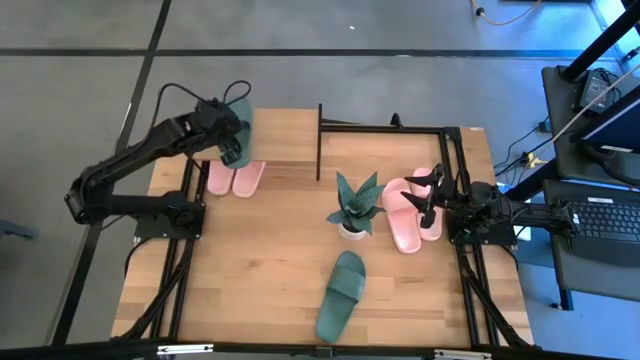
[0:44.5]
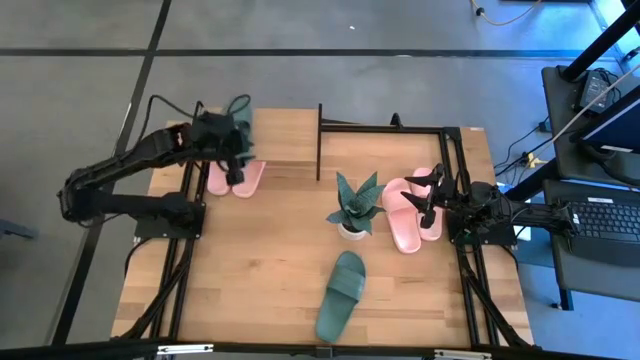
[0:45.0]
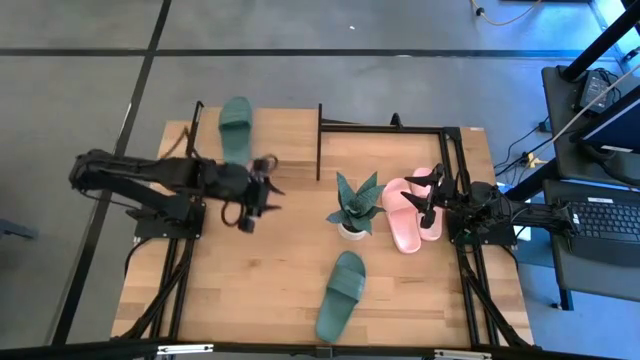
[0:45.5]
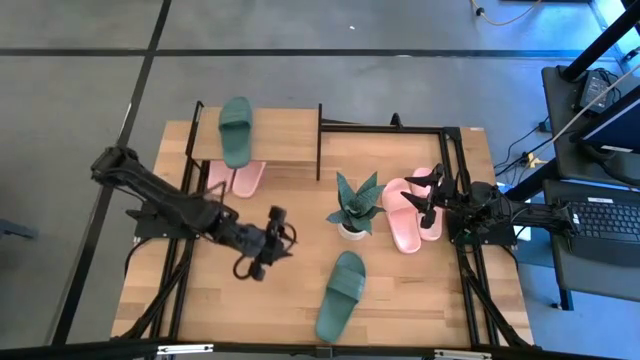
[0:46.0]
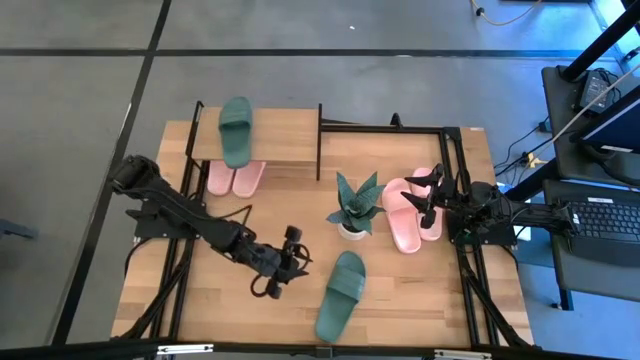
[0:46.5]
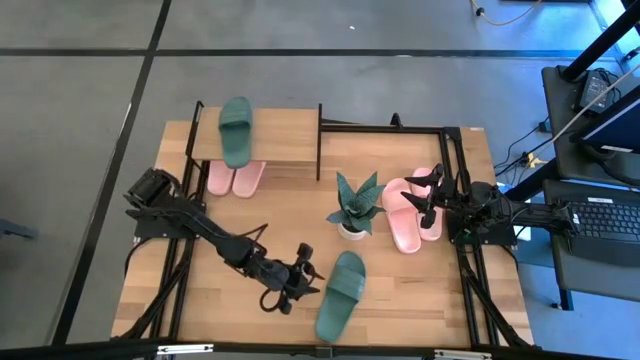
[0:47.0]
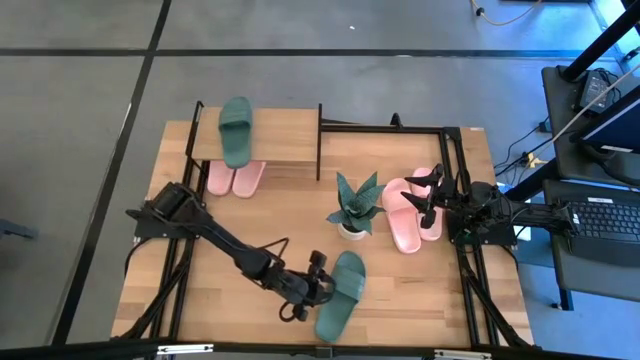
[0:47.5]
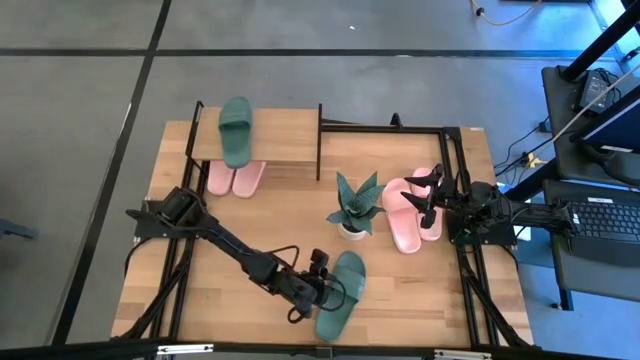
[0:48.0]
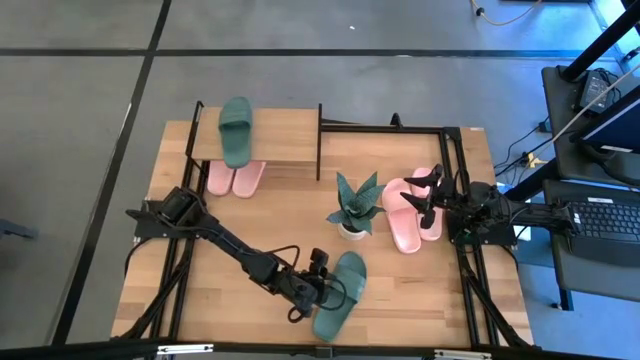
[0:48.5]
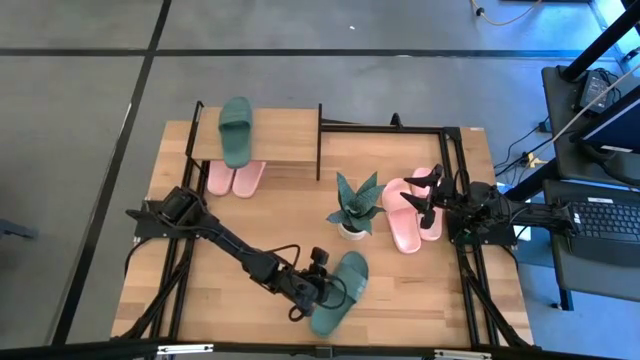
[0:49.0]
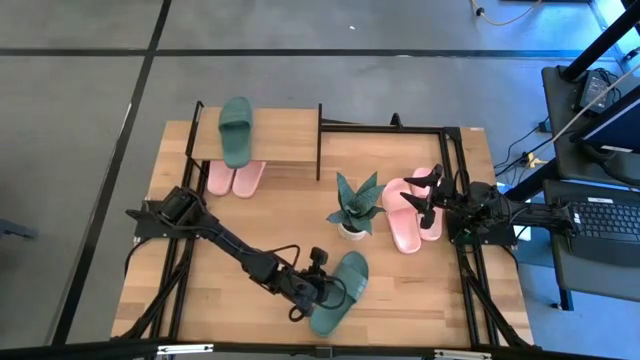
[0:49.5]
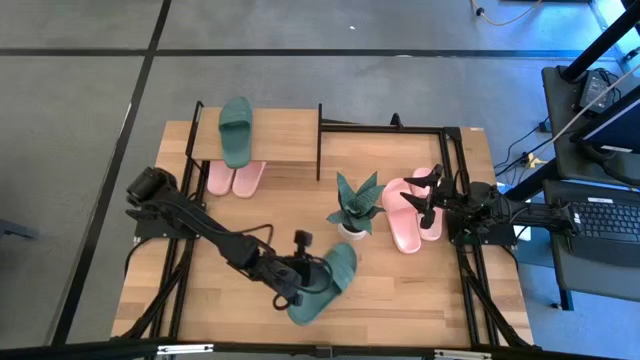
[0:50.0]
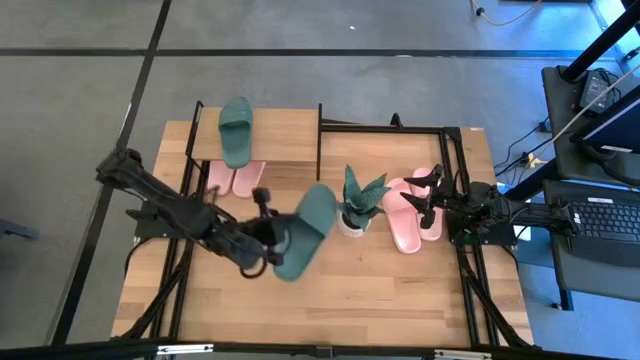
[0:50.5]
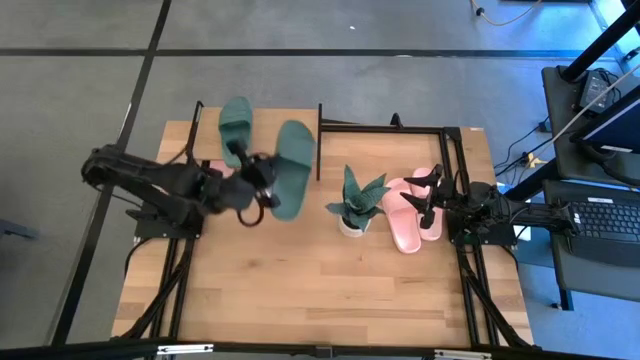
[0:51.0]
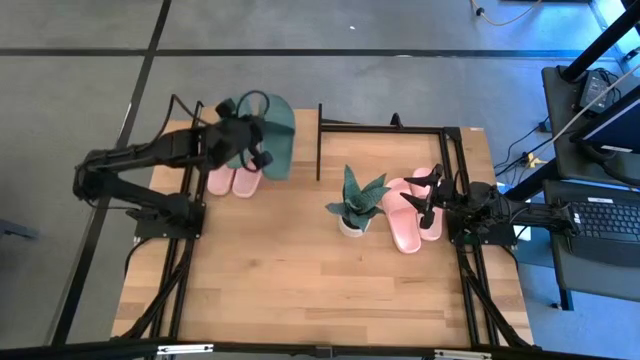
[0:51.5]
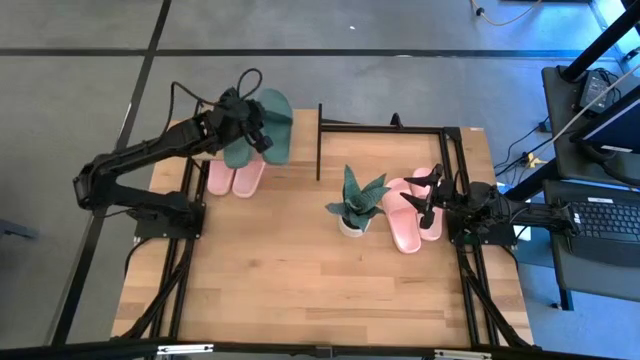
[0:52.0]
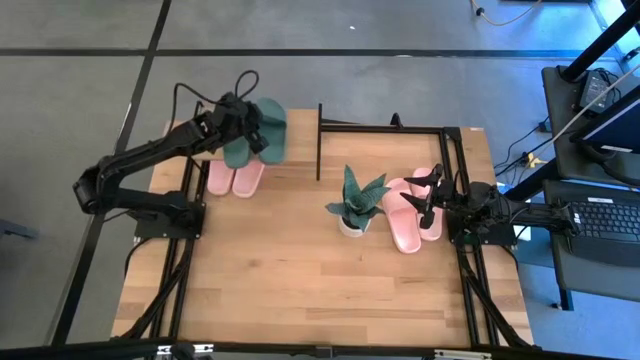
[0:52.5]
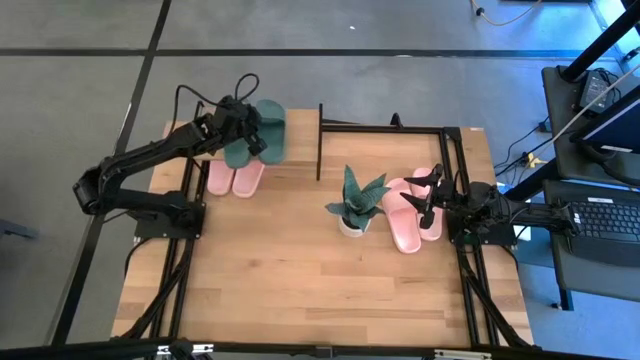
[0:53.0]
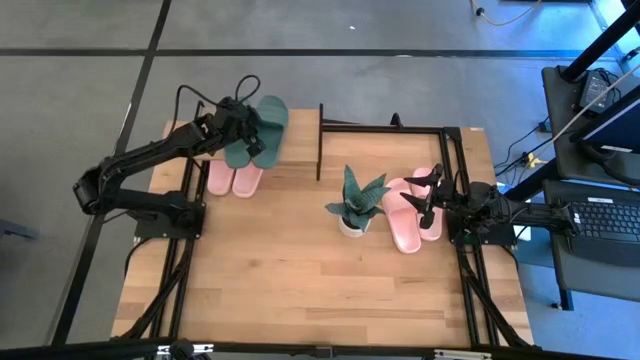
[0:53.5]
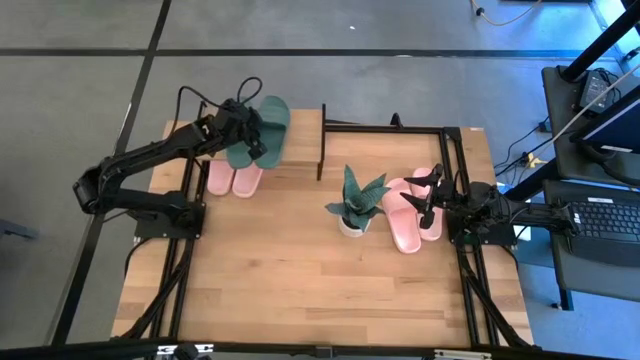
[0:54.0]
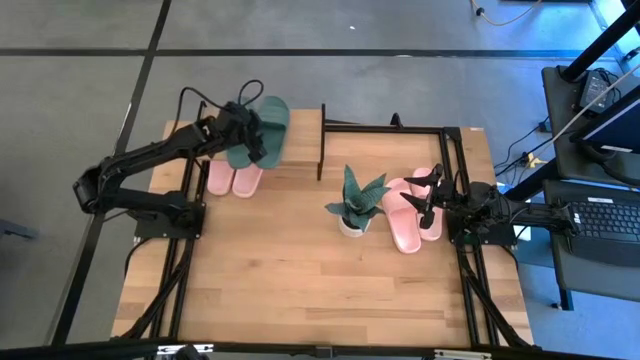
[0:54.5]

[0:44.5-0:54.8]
Task: Pick and place slides into the shelf
Put the green slipper on the shelf

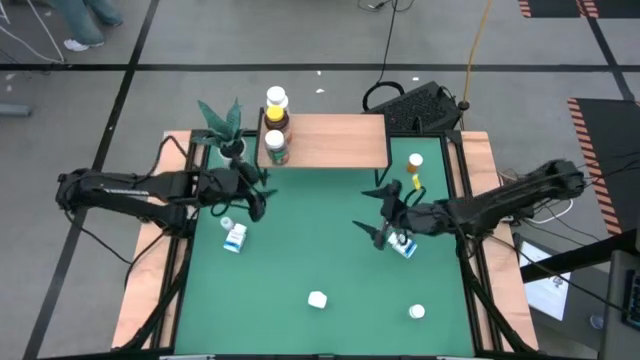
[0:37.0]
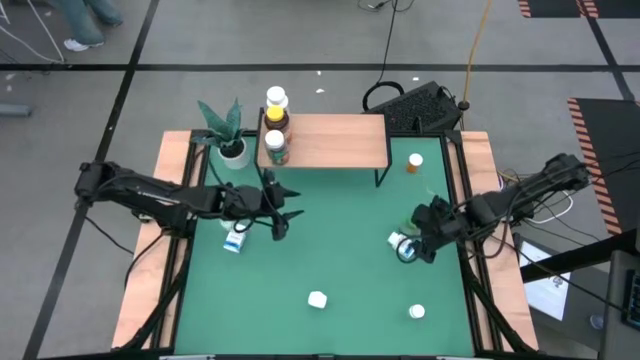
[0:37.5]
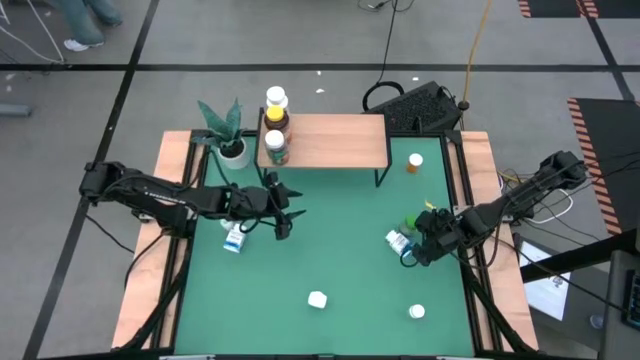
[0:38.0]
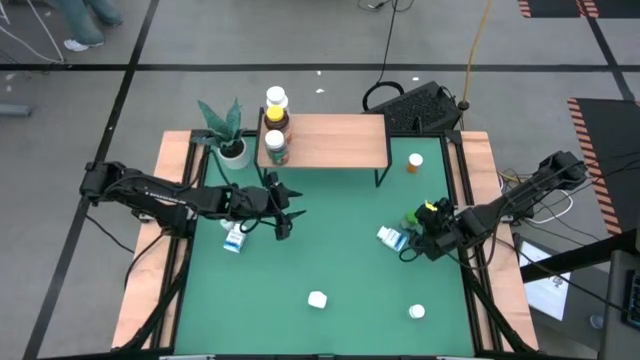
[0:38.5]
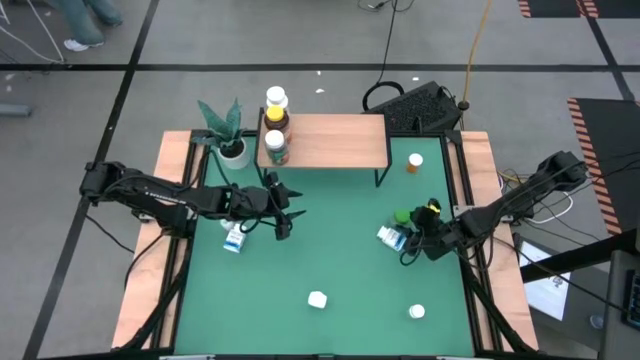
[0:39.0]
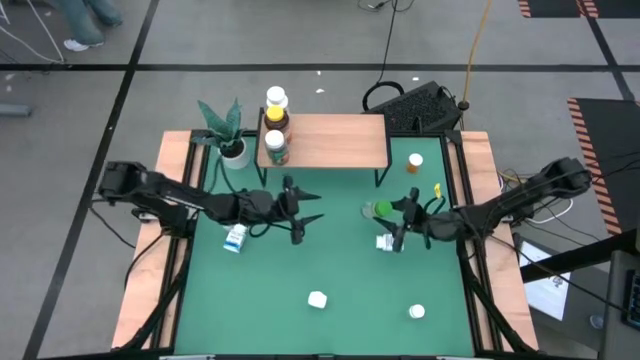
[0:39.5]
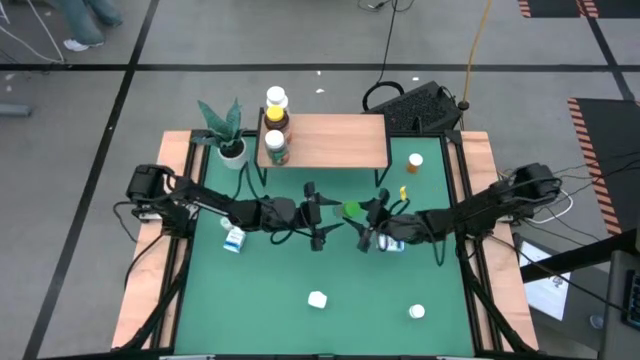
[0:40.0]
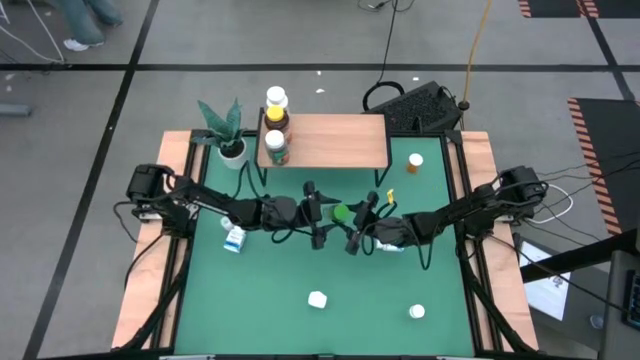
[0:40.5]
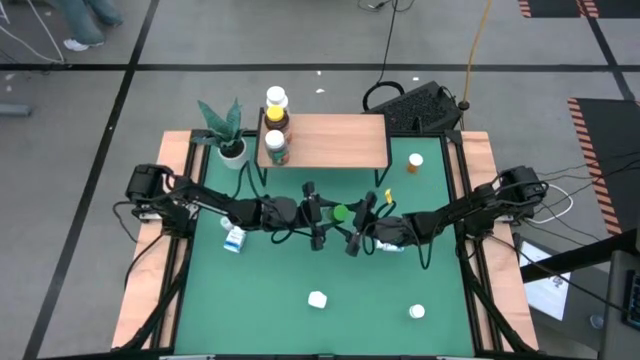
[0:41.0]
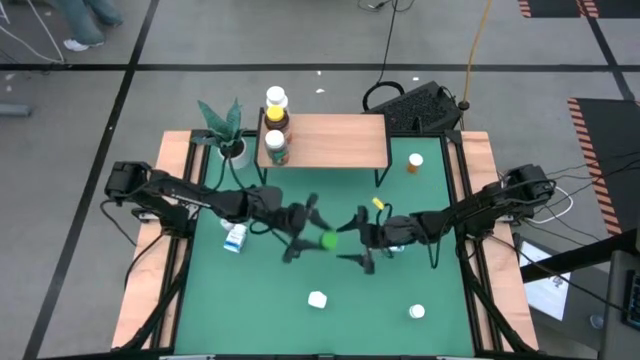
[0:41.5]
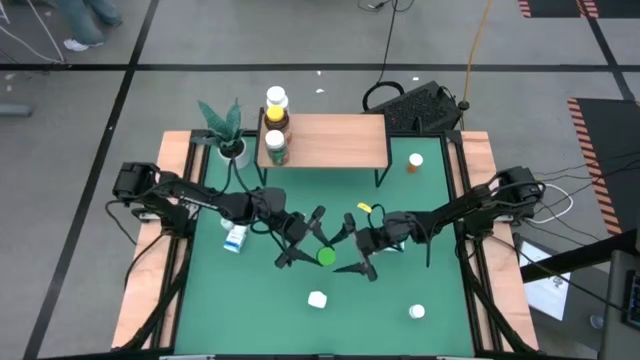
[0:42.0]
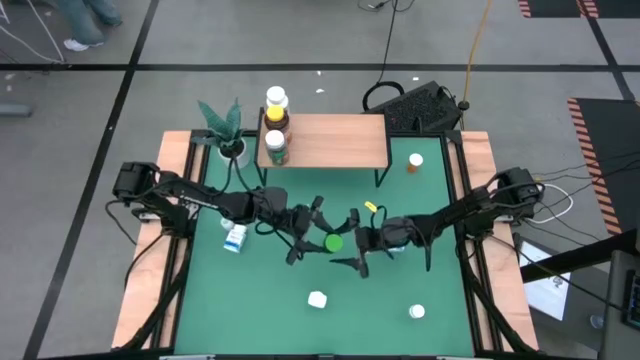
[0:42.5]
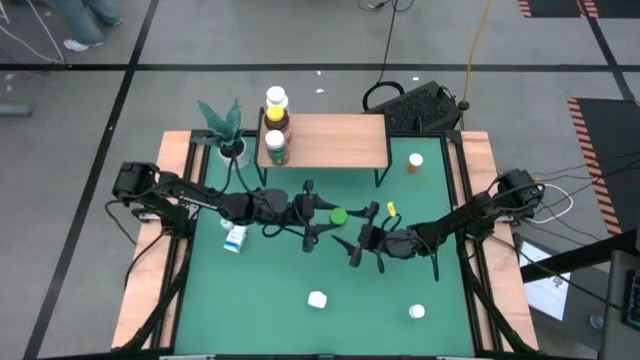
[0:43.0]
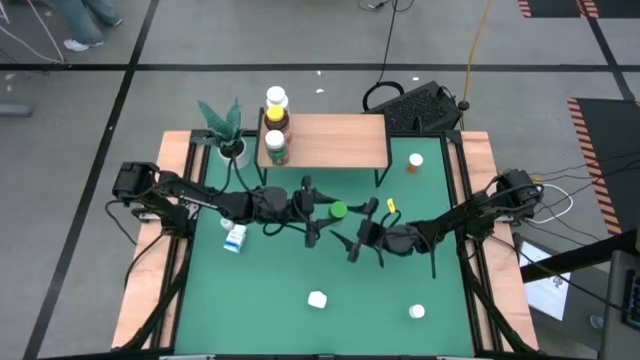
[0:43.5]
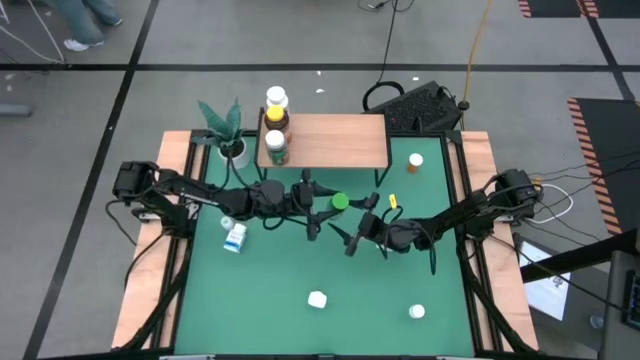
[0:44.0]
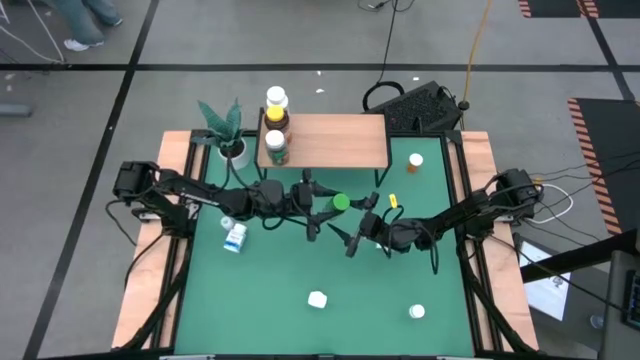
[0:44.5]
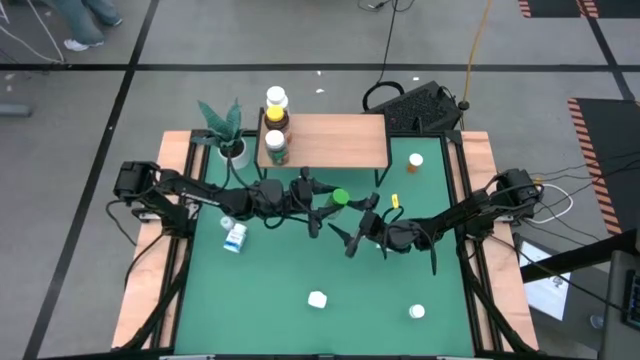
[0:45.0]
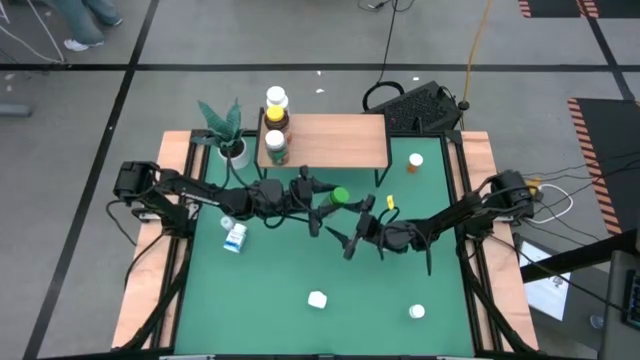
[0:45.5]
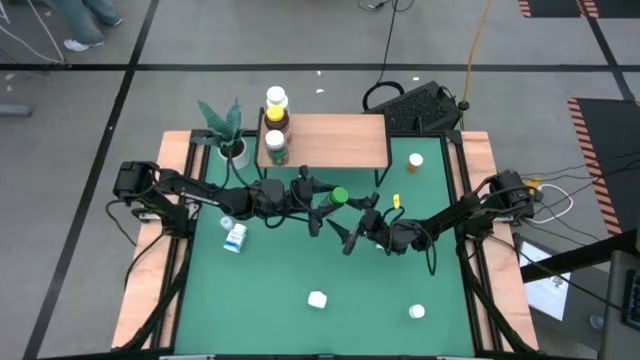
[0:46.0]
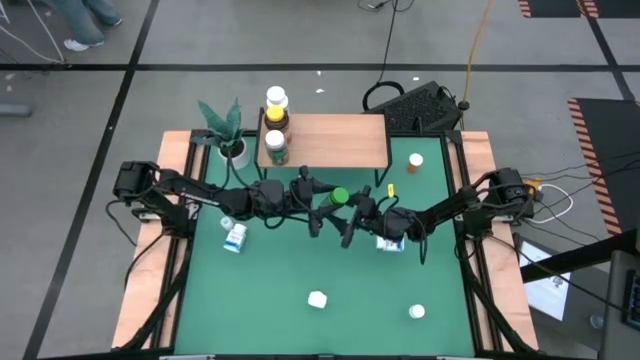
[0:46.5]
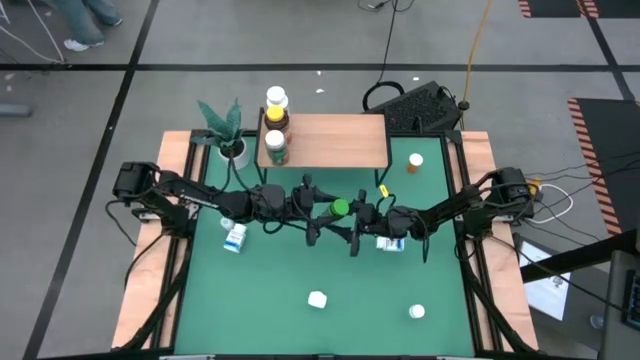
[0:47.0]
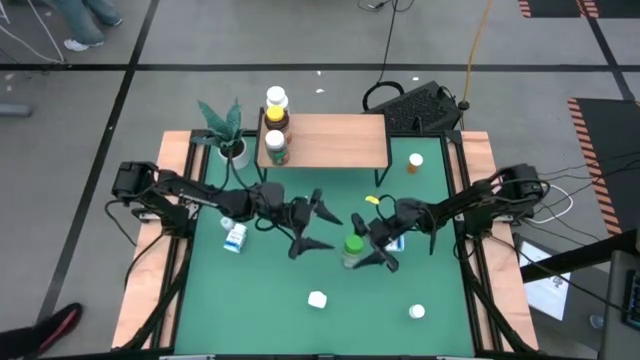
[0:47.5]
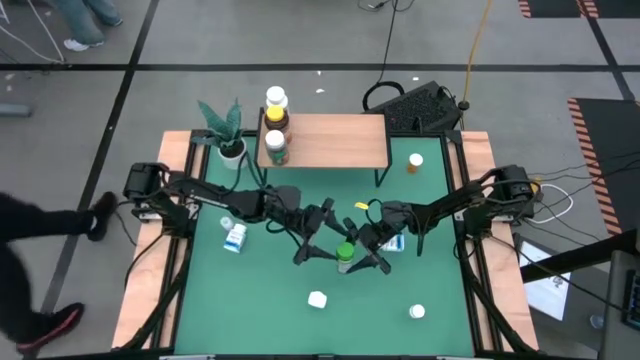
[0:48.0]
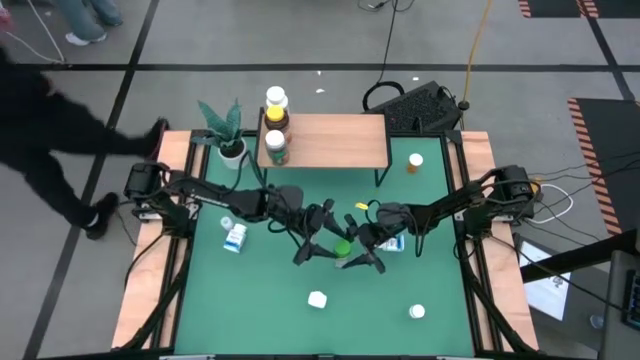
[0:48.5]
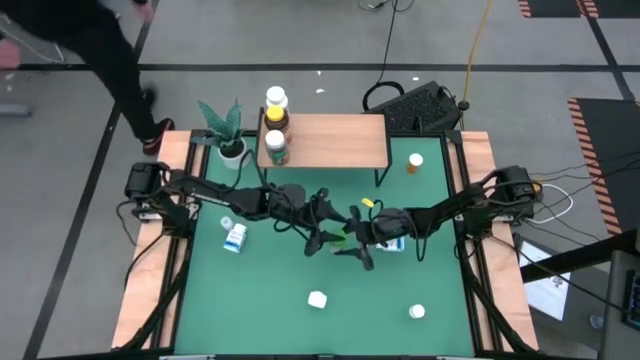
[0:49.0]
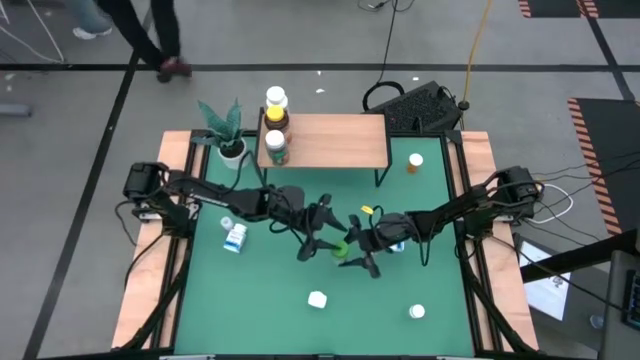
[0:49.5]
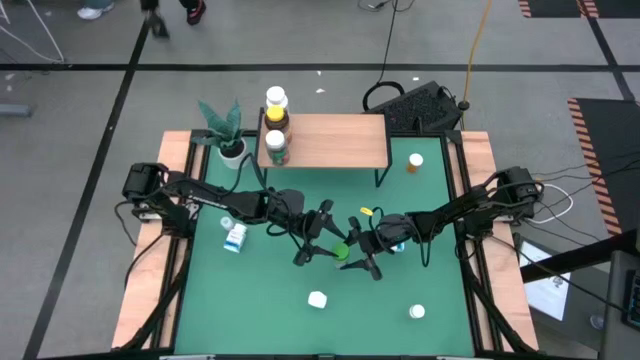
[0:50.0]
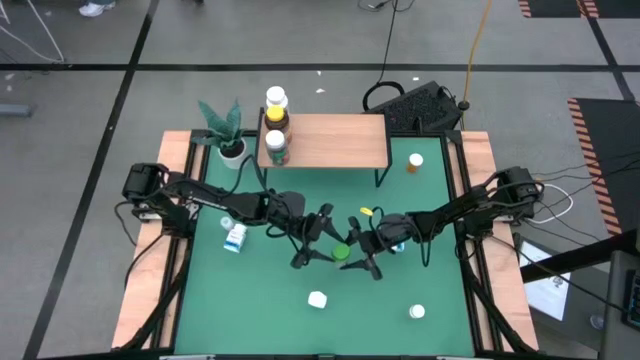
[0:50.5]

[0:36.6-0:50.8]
Task: Pick and place medicine bottles onto shelf by color
Put the green pill bottle on the shelf
